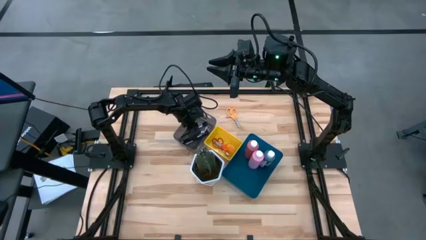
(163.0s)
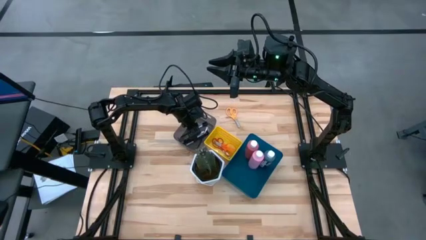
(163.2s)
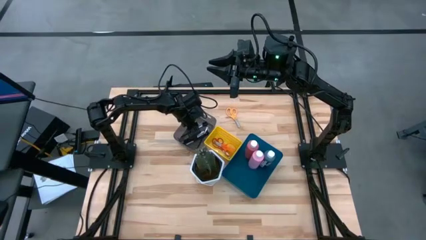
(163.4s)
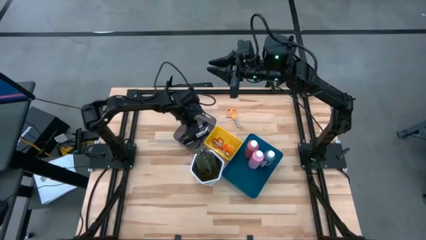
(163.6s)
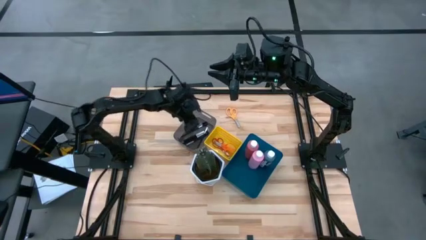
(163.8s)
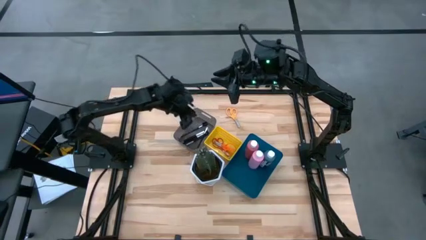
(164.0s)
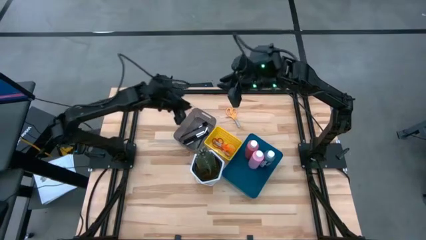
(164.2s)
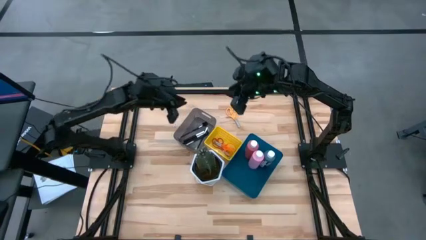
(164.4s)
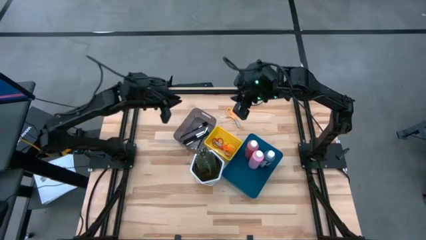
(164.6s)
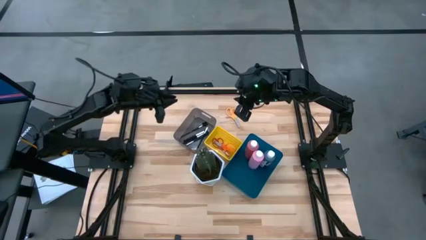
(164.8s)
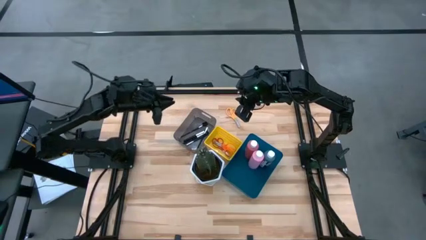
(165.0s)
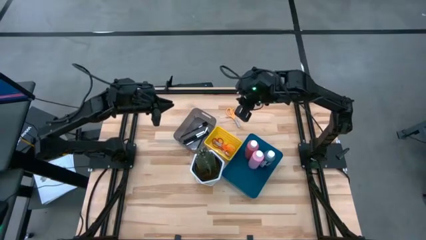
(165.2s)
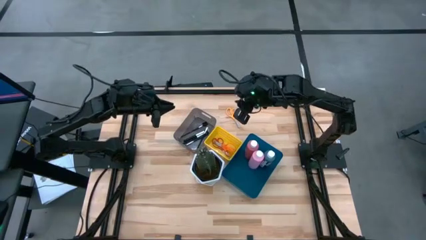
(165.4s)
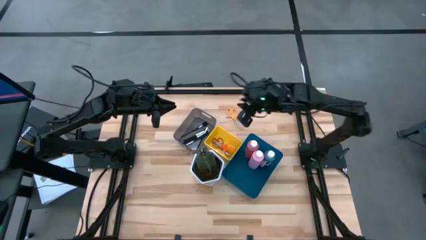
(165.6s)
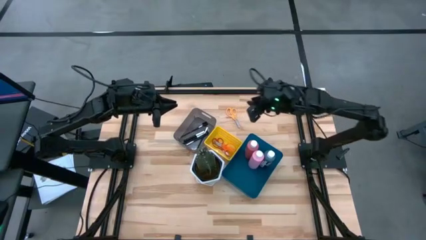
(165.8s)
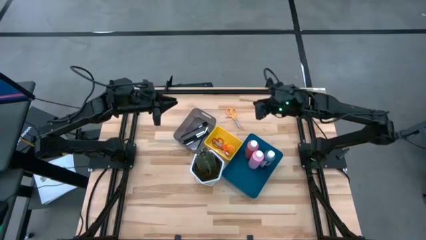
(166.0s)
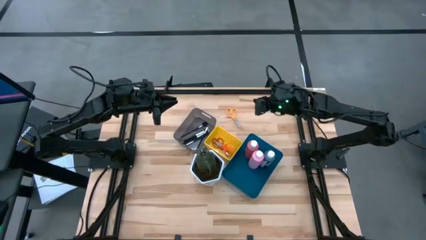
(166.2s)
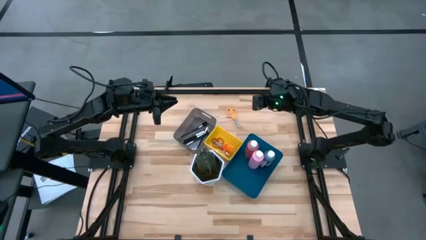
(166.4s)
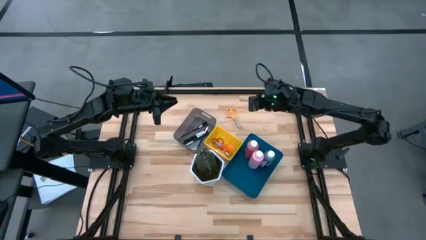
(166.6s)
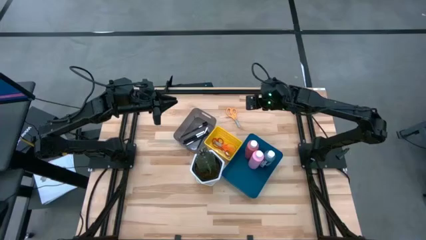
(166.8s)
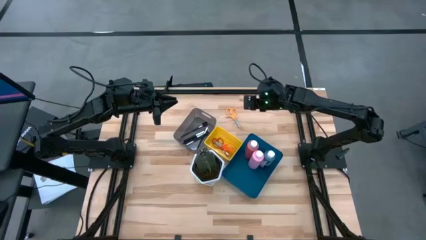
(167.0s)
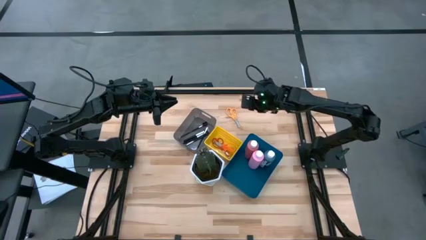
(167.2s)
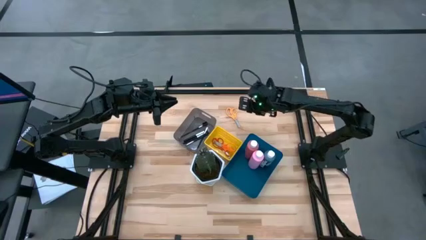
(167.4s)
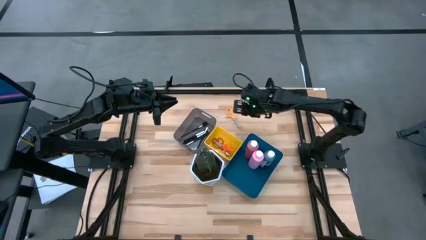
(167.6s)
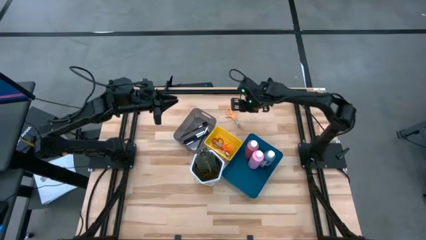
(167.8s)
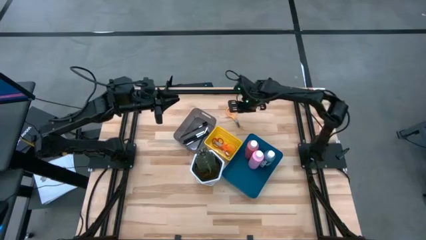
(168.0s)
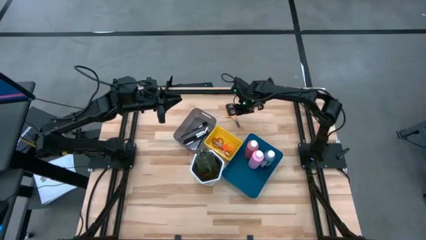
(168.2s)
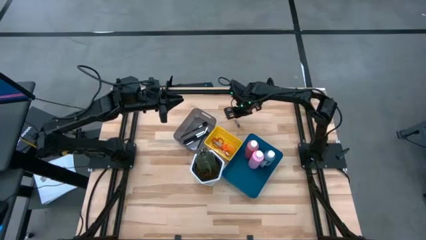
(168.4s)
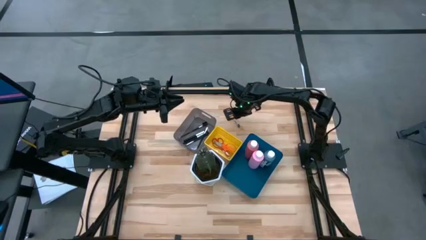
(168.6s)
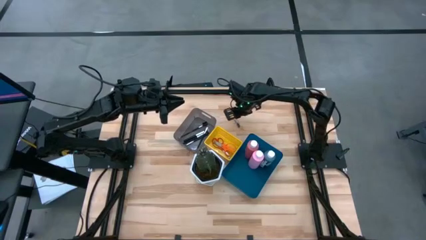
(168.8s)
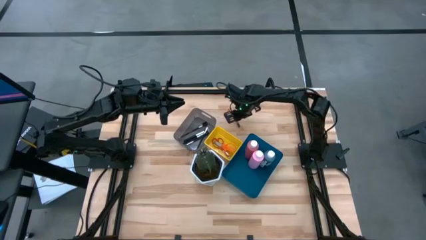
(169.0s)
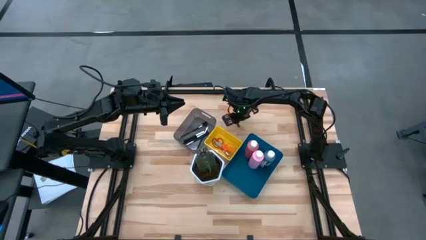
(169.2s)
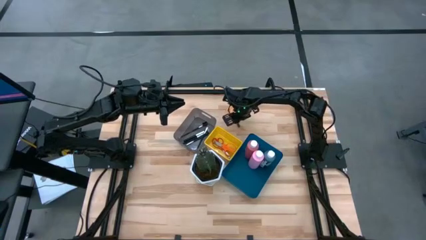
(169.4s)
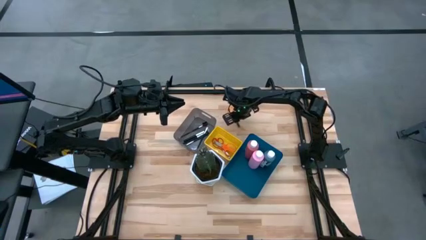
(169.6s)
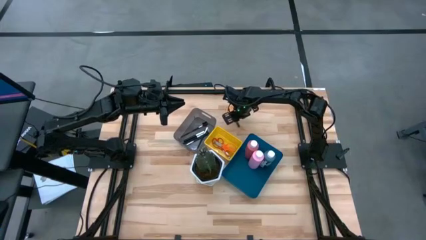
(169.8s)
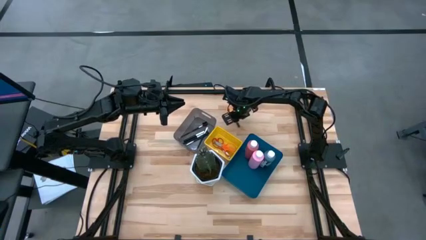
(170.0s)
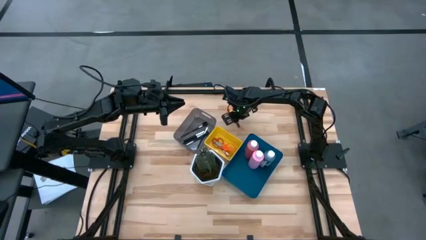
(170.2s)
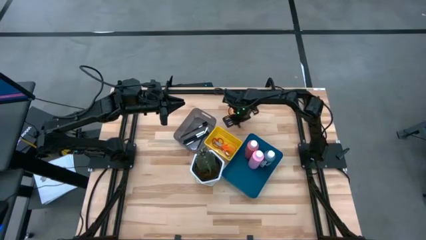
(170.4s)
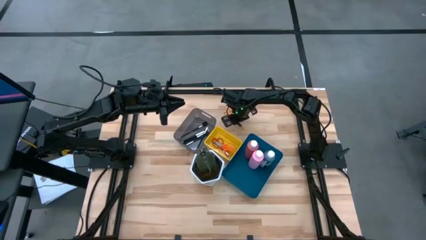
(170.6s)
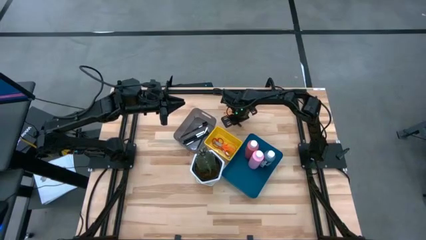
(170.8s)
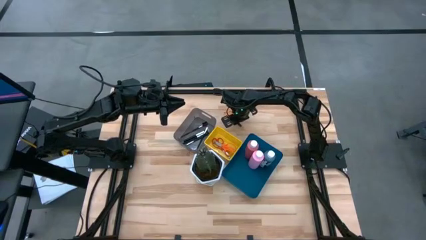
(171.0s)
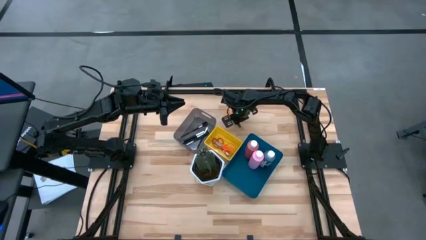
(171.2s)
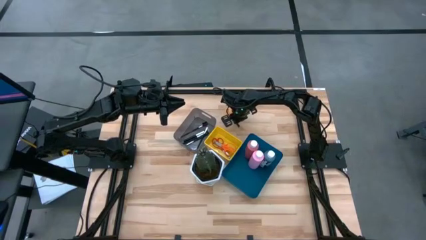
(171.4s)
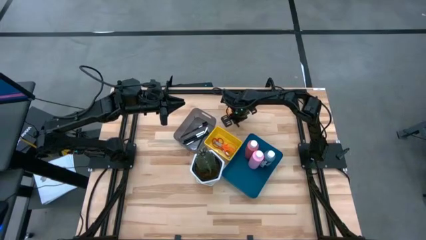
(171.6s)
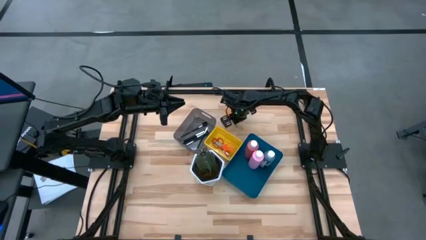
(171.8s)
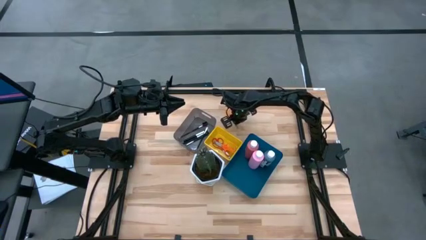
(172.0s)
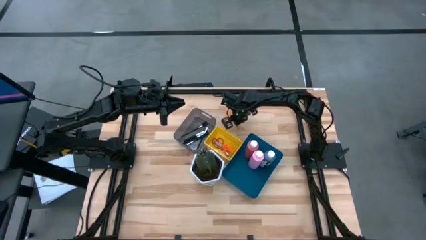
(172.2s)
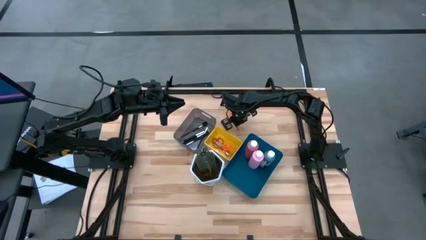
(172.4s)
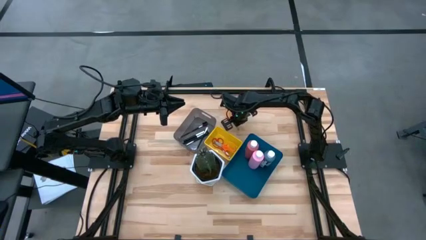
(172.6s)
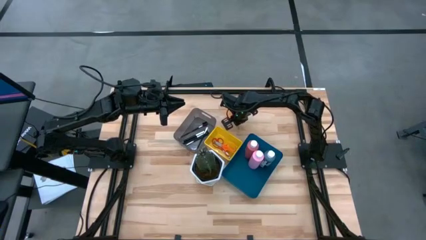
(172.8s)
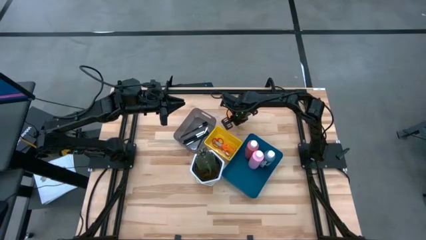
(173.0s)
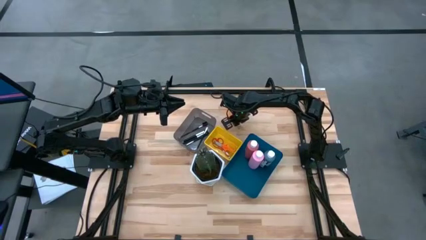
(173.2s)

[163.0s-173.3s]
Task: Pick & Place Paint Supplies
Put the yellow scissors into the yellow bin

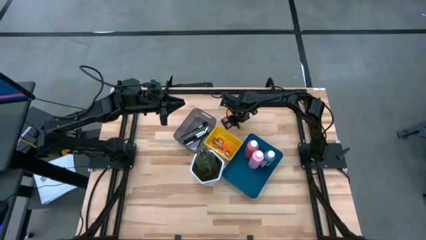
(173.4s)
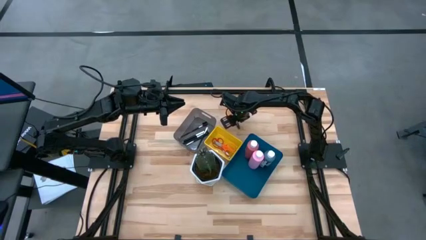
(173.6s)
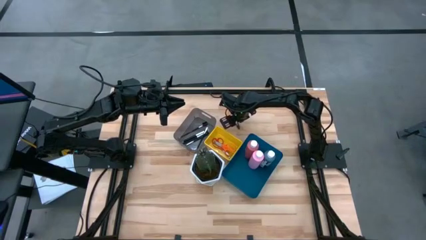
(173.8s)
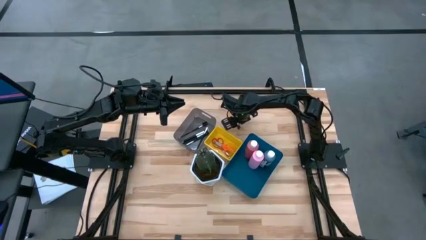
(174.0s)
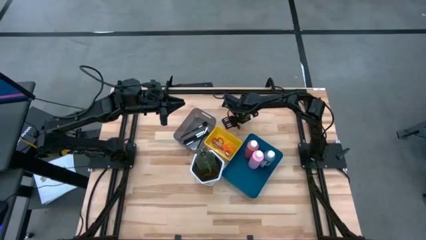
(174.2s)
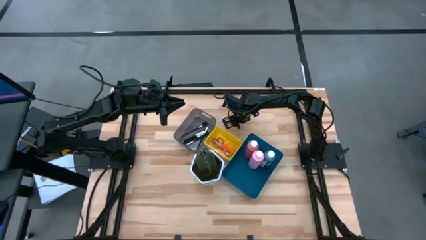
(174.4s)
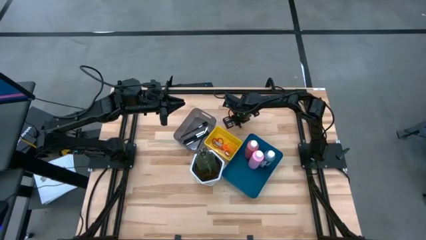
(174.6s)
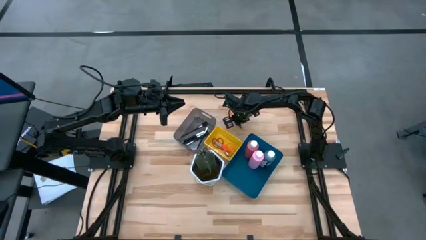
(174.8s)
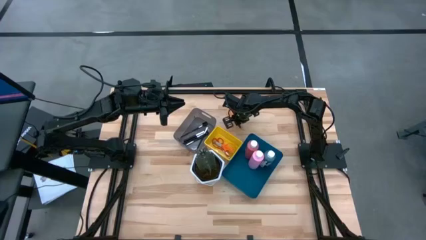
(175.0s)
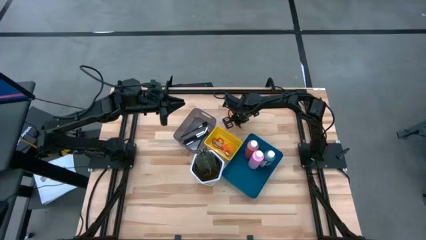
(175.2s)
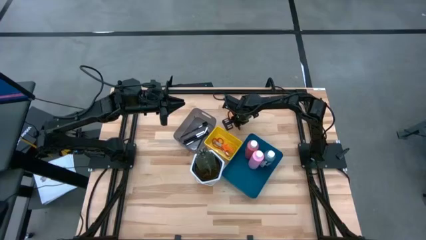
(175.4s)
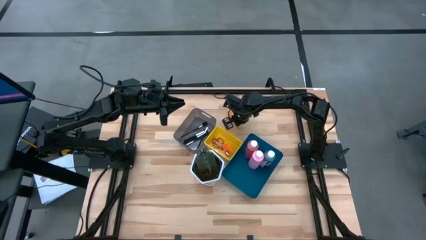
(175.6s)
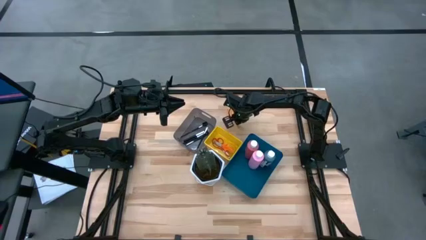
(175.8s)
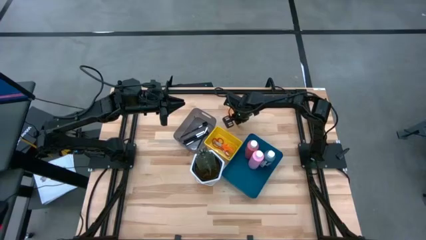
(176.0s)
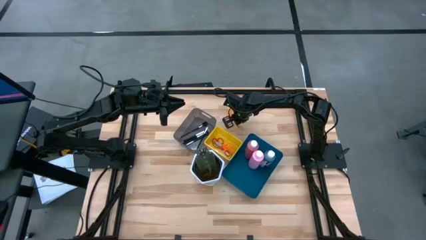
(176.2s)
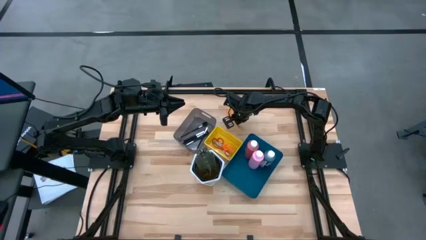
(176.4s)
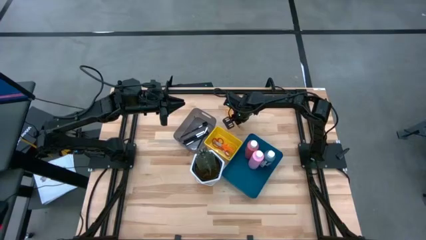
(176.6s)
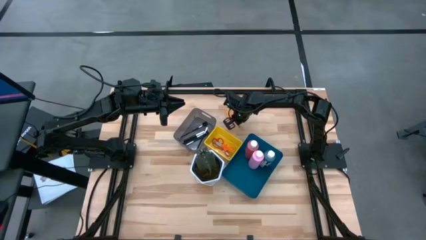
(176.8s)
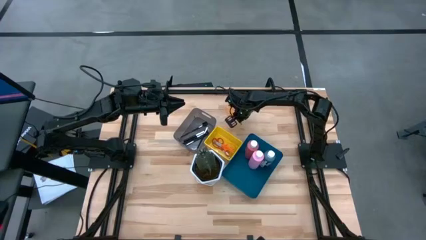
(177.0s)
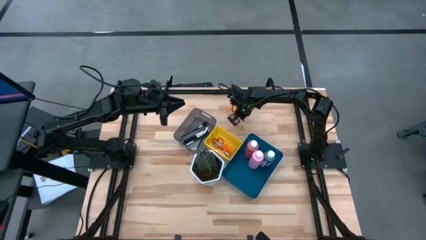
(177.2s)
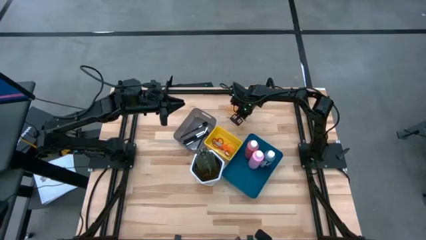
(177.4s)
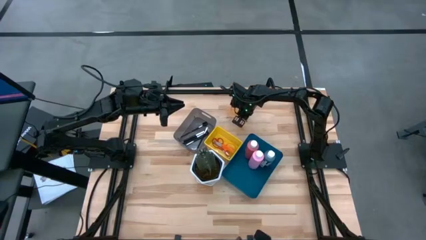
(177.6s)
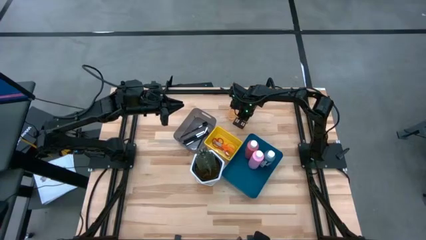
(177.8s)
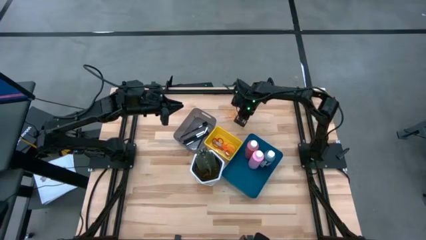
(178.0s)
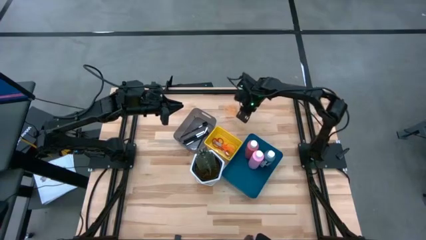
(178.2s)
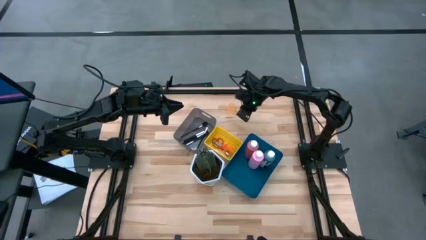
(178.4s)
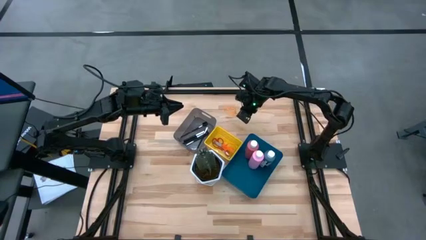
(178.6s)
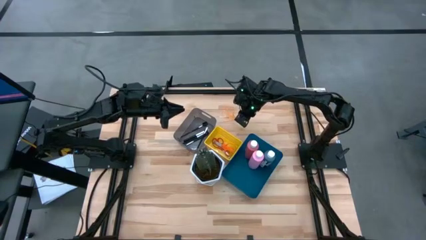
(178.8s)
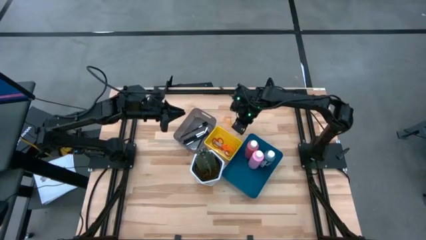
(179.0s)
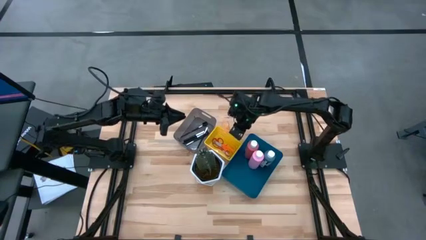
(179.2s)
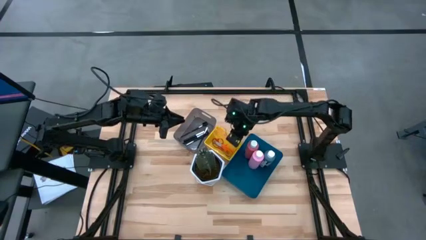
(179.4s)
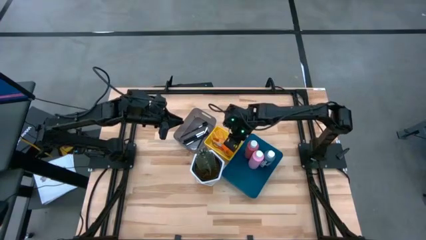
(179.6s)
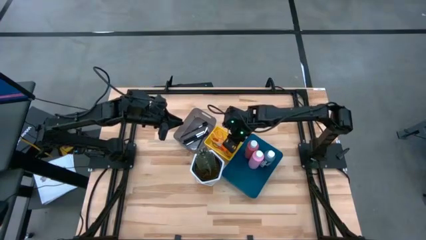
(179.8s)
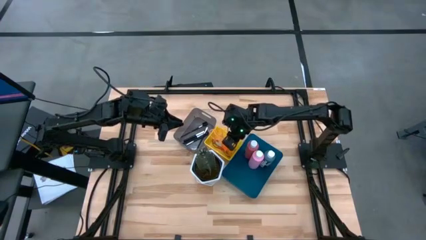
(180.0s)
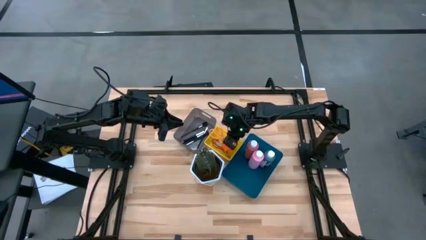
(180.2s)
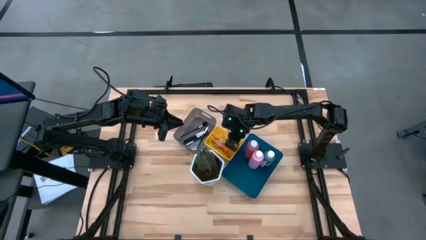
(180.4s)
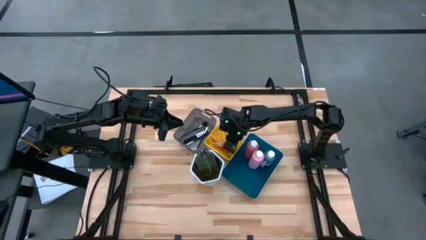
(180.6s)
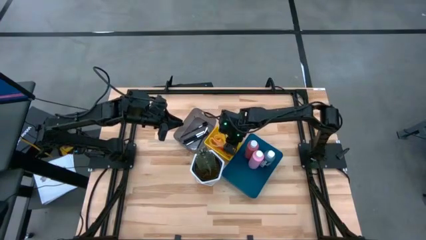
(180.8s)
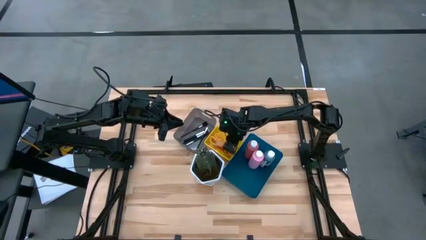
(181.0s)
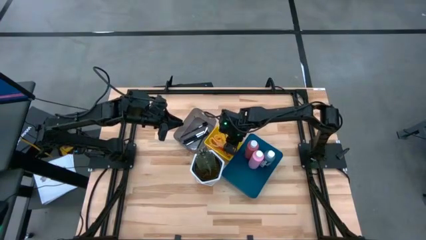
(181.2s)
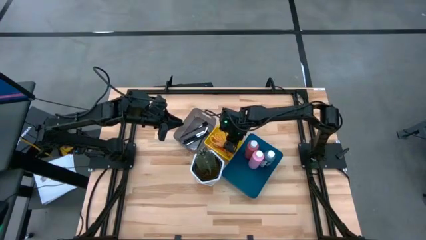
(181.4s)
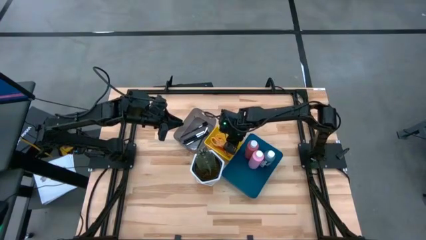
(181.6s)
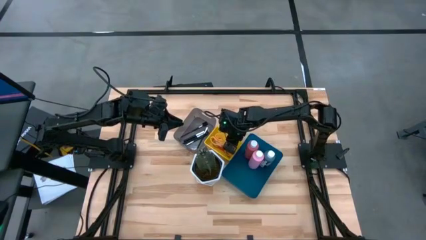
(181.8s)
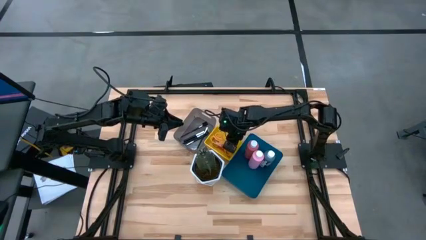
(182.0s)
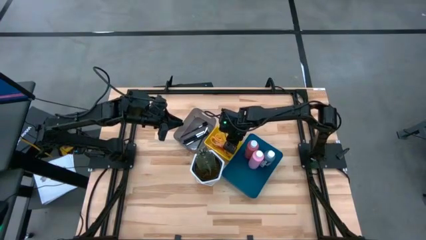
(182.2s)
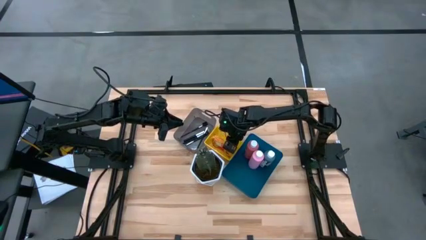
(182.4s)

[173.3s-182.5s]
Put the yellow scissors into the yellow bin
